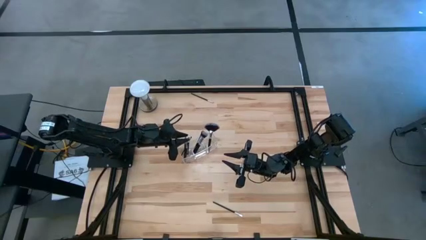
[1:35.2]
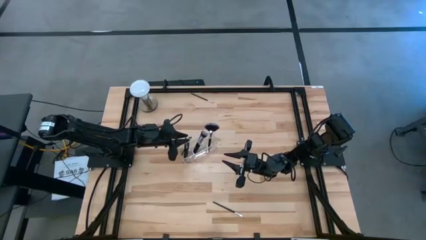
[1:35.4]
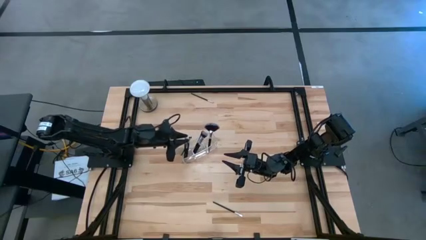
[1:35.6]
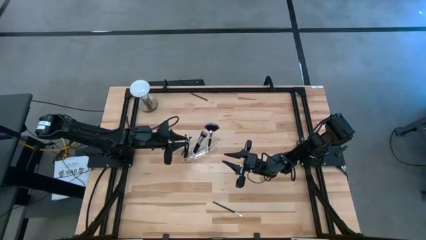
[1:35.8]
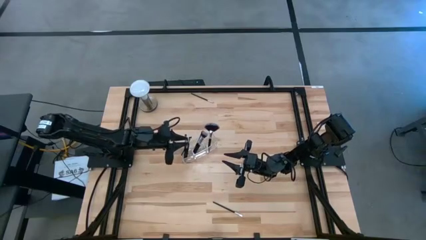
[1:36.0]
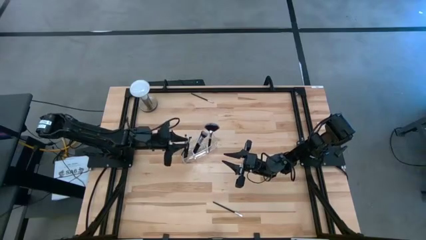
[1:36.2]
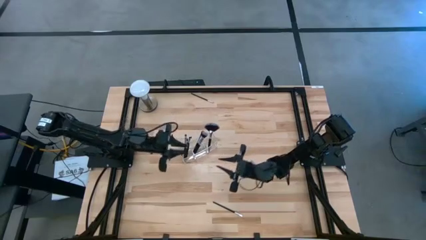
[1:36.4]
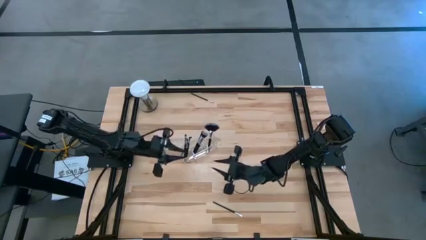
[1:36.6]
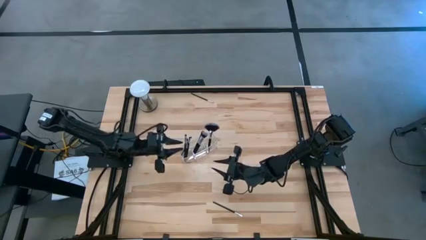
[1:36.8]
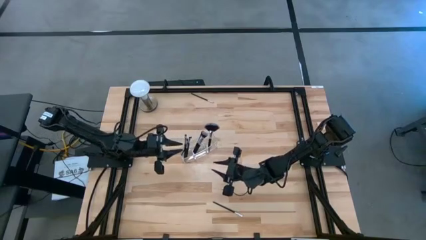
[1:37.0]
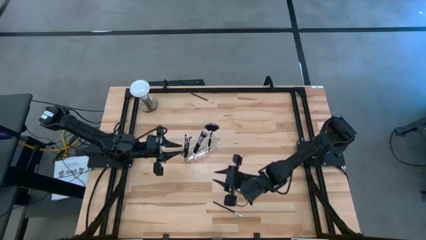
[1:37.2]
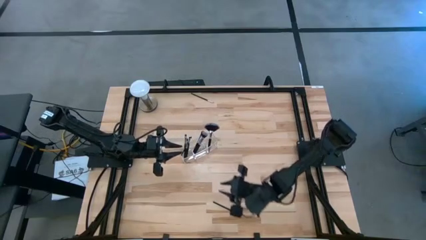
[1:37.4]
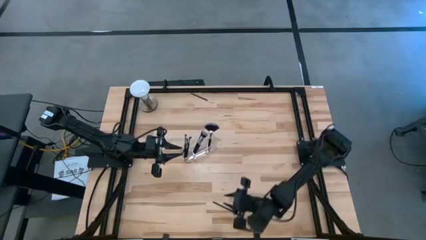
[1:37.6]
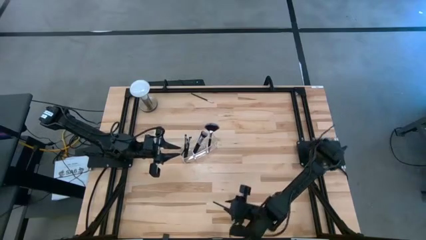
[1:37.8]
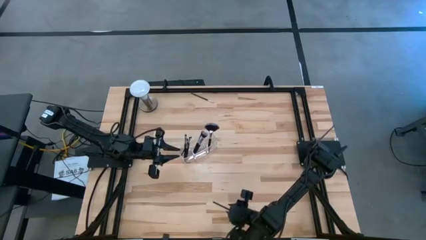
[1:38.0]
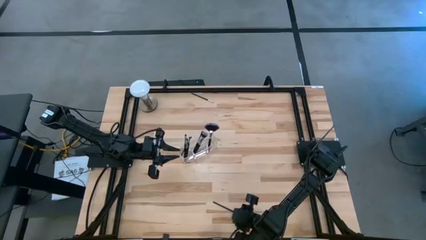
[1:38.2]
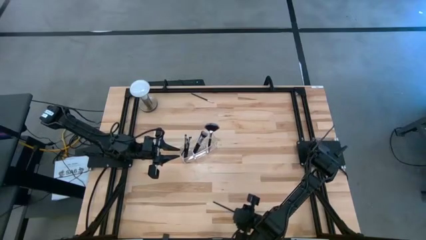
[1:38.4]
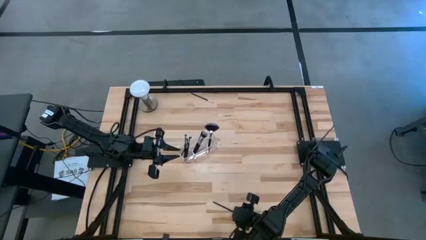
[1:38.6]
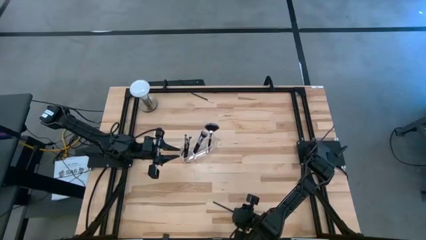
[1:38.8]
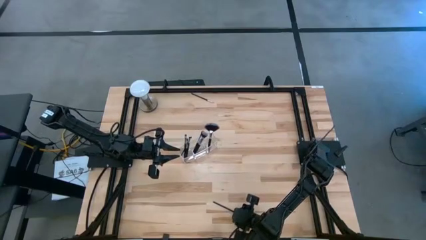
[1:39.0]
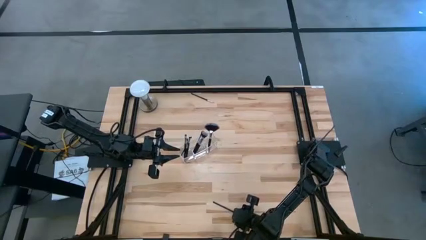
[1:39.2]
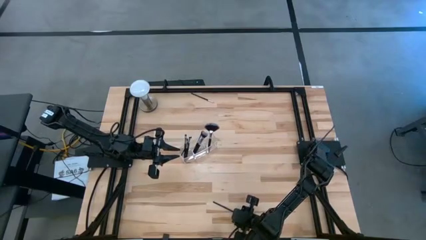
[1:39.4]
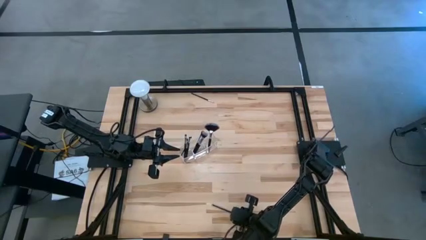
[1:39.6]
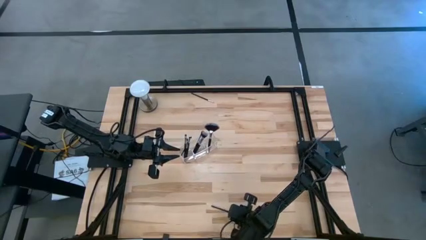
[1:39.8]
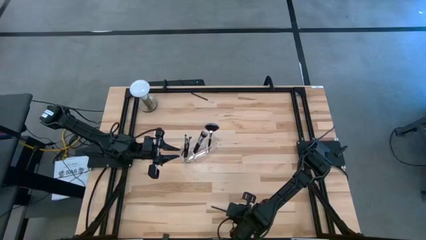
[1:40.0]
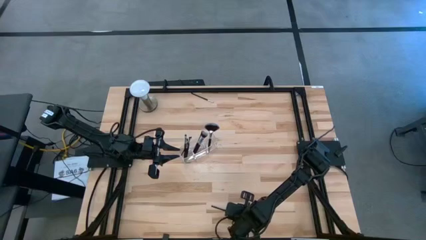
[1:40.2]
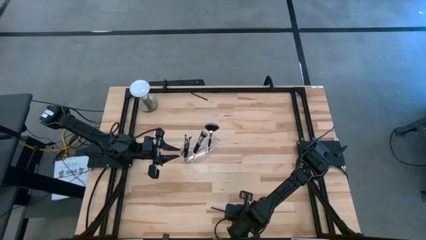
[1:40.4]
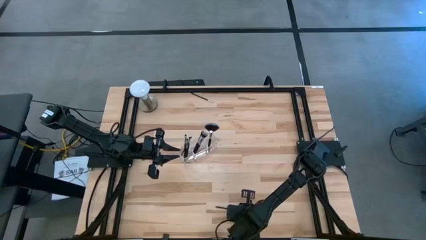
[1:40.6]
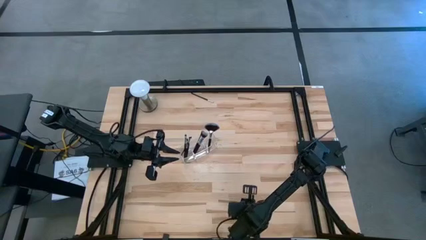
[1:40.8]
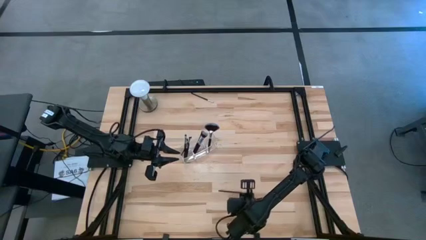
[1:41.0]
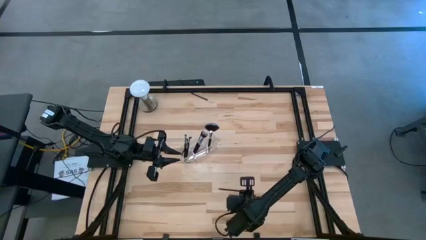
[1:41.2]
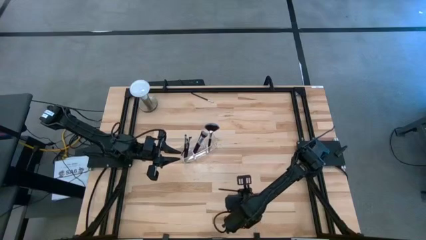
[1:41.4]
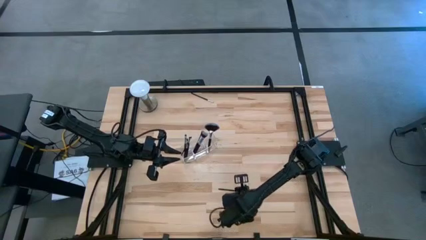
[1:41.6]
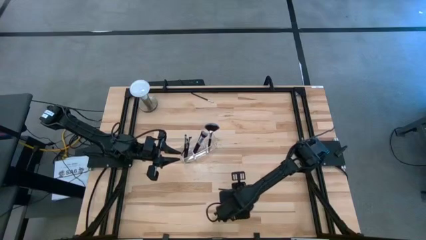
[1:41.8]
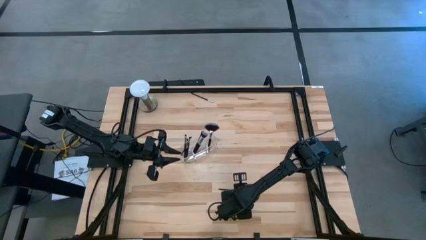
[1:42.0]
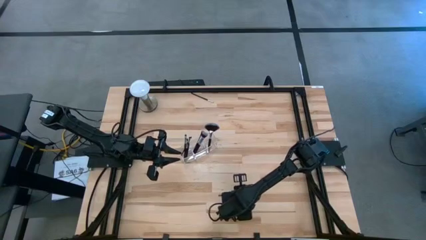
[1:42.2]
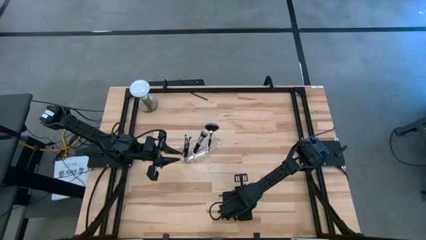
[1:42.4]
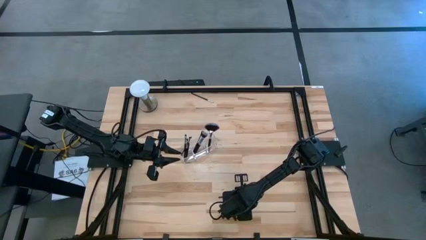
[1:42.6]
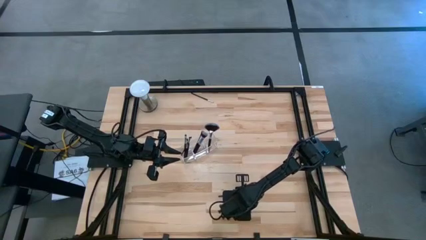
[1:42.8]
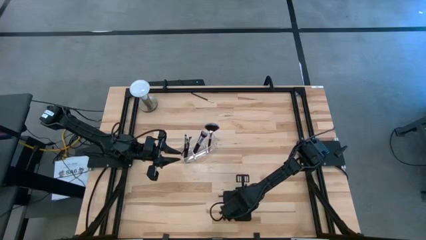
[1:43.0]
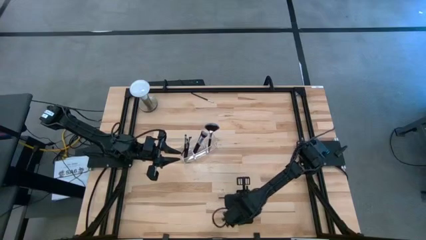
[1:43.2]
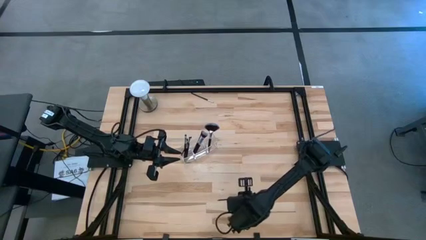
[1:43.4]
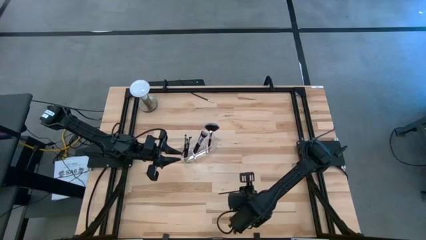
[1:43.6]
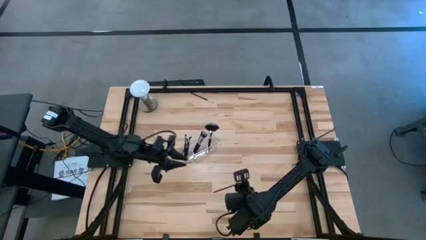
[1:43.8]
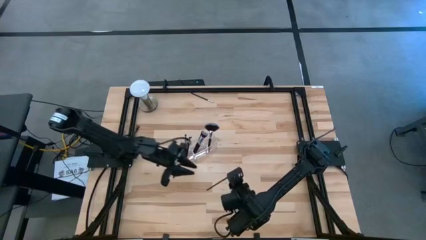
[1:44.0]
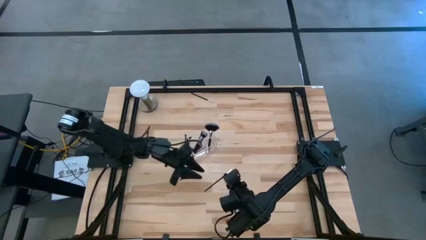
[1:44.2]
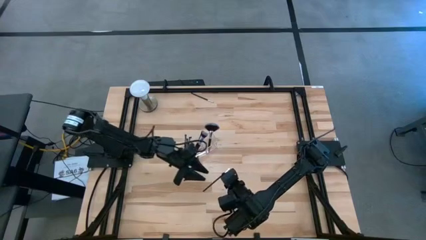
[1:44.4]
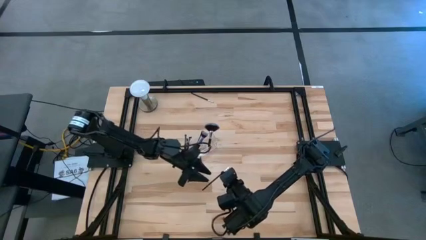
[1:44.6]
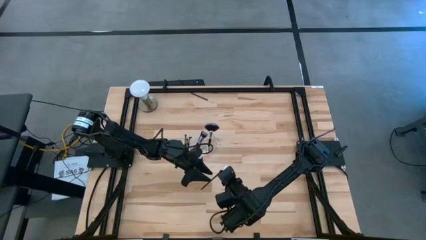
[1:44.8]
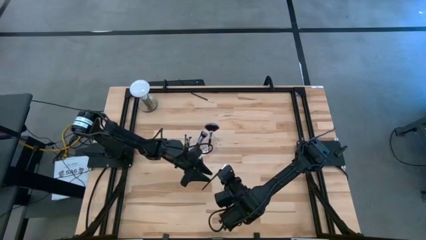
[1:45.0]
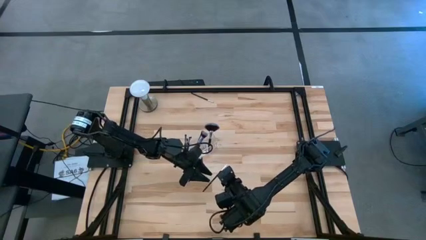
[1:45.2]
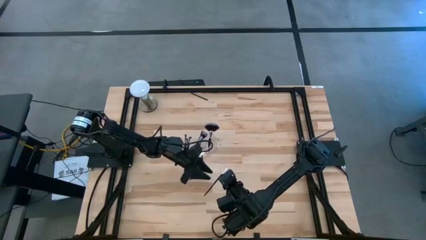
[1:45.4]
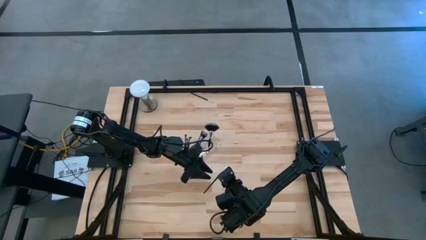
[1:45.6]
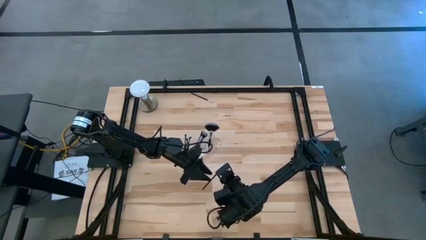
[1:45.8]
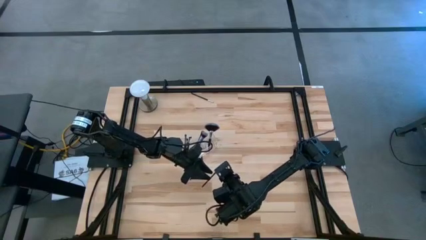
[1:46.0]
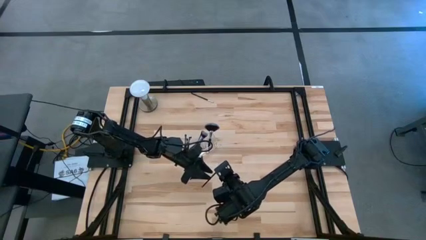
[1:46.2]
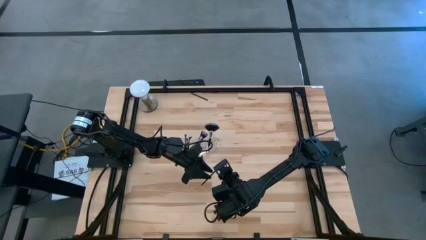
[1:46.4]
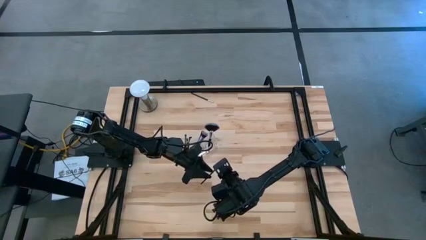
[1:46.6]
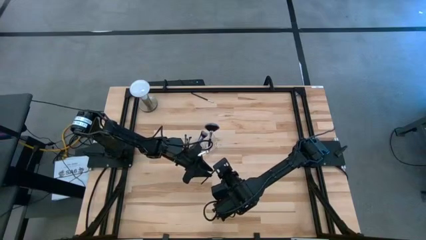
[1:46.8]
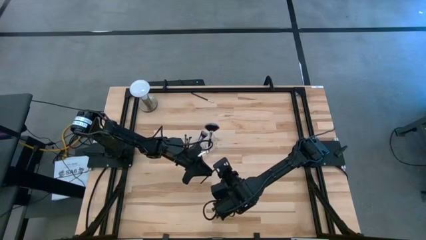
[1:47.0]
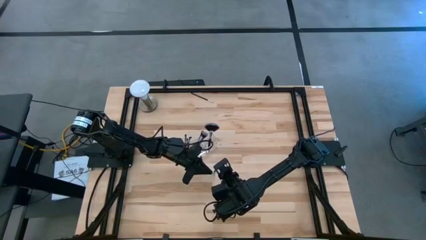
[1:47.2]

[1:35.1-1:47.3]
Task: Put items in baskets/containers
Put the white eyeshadow brush into the left section of the transparent organizer
